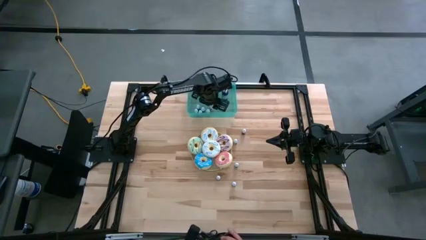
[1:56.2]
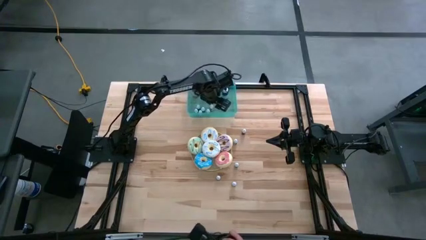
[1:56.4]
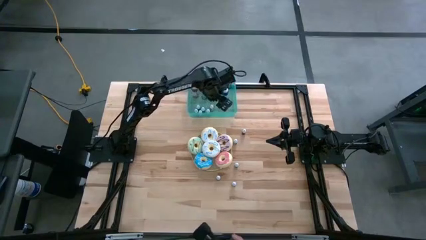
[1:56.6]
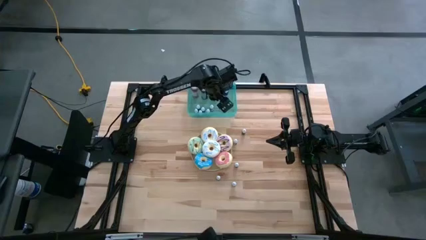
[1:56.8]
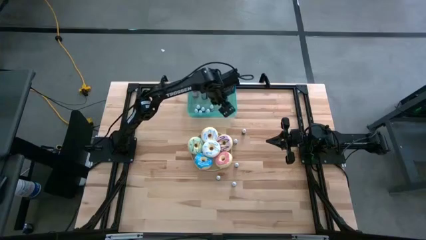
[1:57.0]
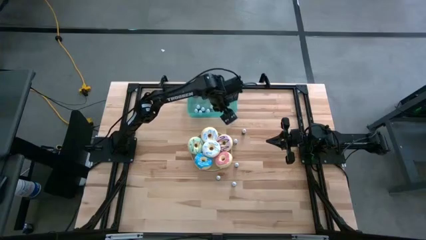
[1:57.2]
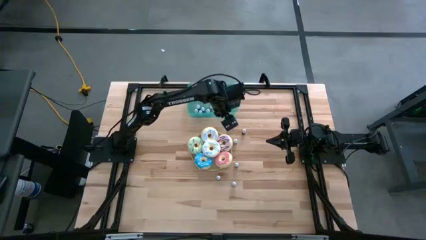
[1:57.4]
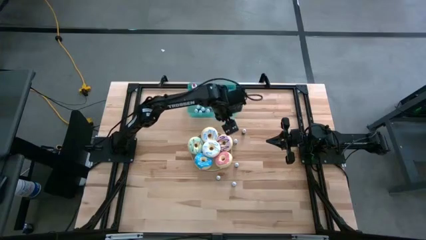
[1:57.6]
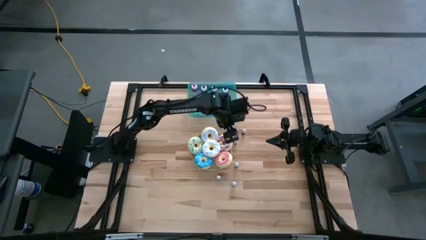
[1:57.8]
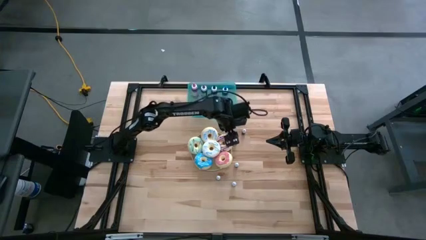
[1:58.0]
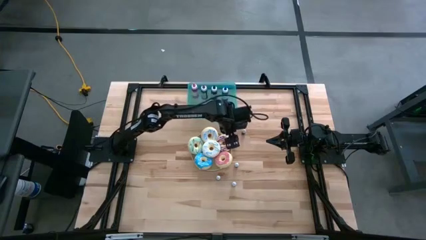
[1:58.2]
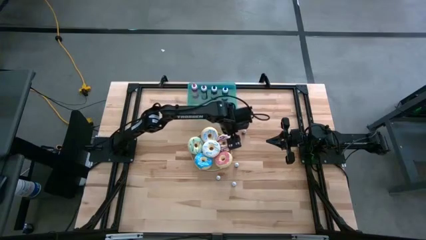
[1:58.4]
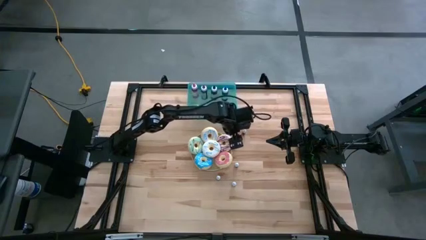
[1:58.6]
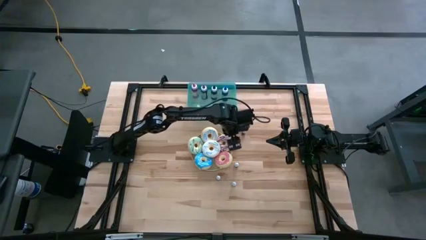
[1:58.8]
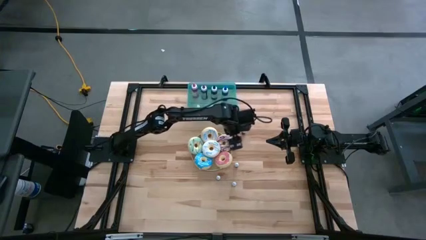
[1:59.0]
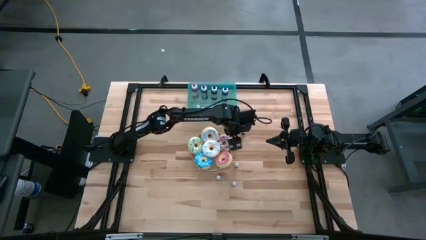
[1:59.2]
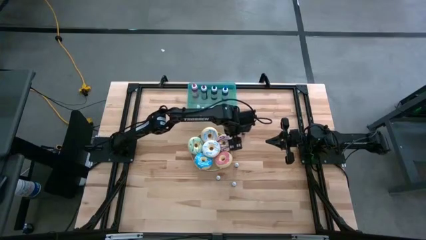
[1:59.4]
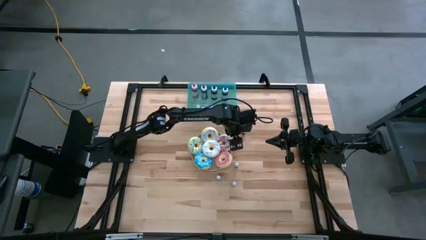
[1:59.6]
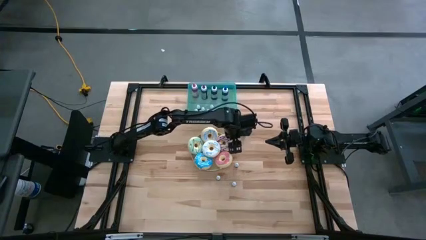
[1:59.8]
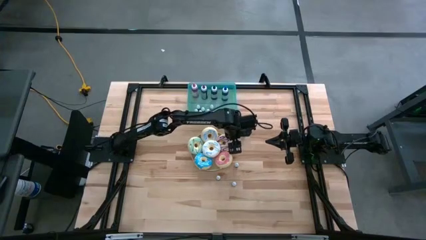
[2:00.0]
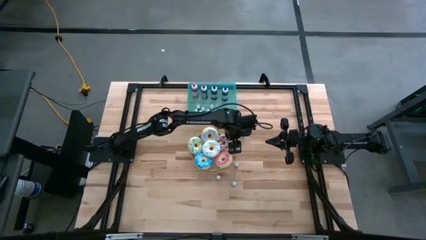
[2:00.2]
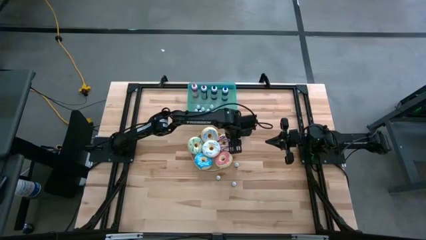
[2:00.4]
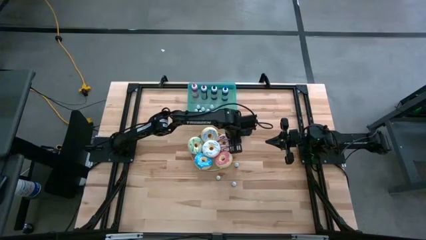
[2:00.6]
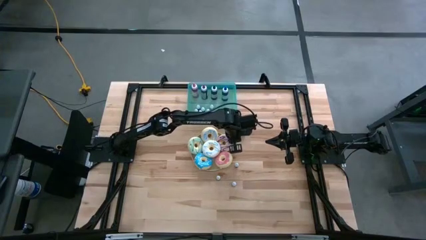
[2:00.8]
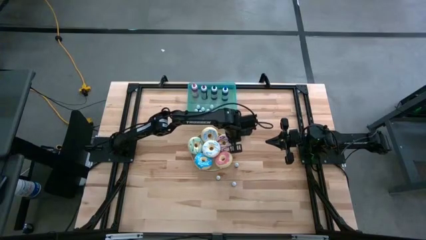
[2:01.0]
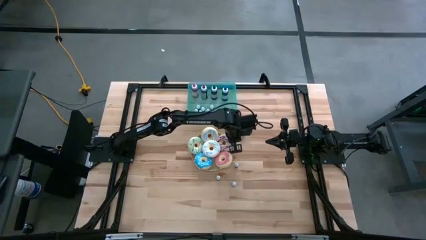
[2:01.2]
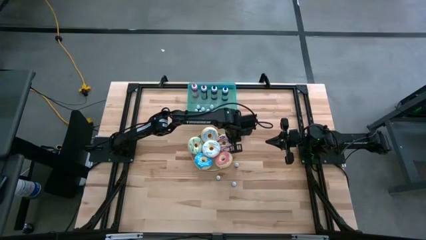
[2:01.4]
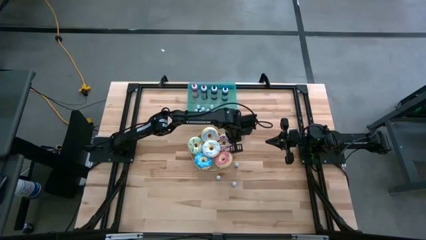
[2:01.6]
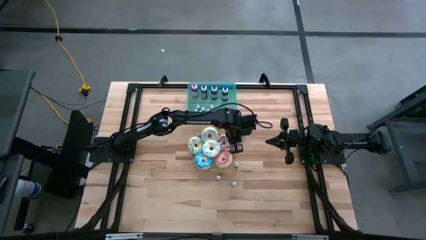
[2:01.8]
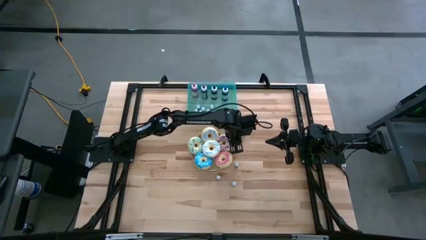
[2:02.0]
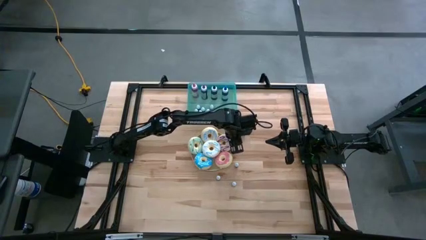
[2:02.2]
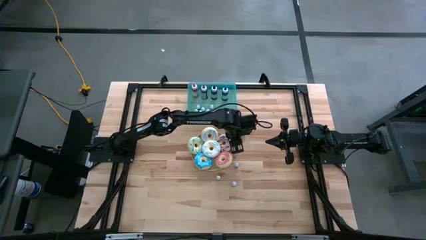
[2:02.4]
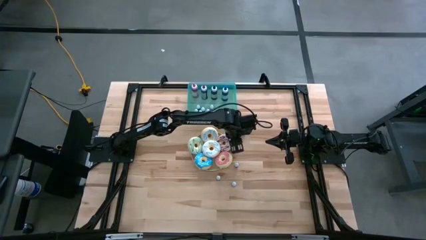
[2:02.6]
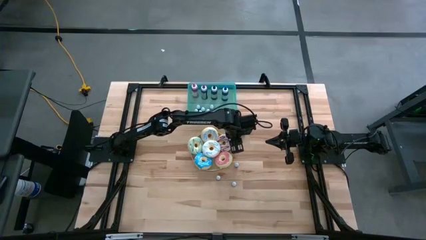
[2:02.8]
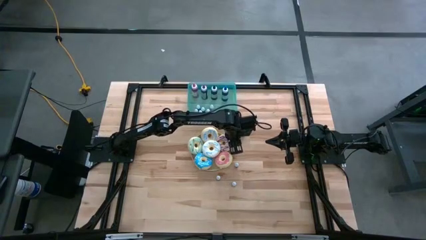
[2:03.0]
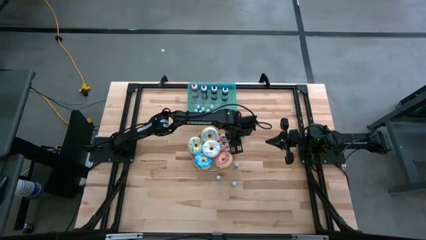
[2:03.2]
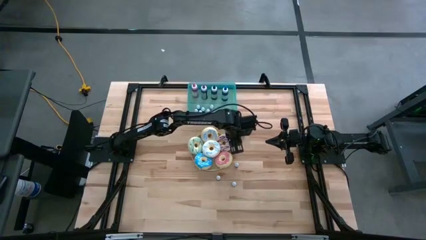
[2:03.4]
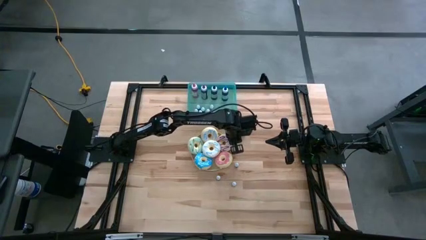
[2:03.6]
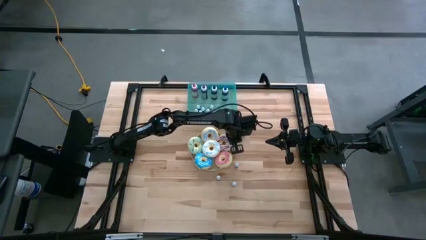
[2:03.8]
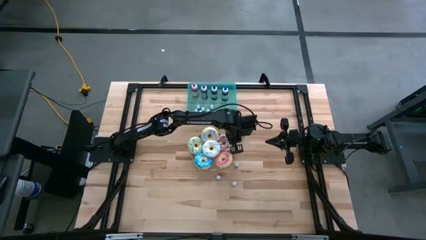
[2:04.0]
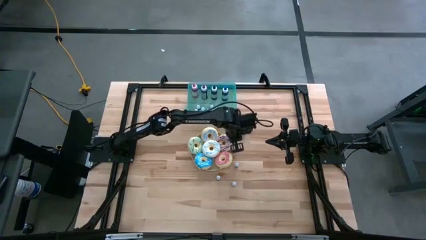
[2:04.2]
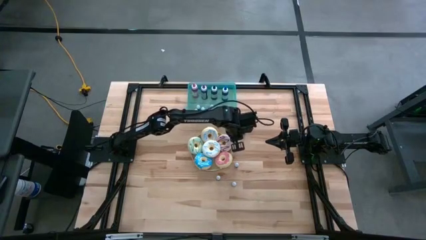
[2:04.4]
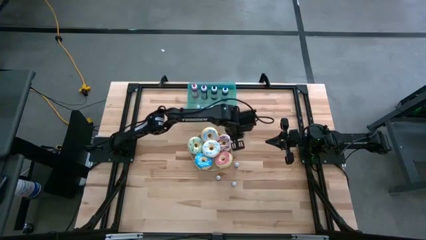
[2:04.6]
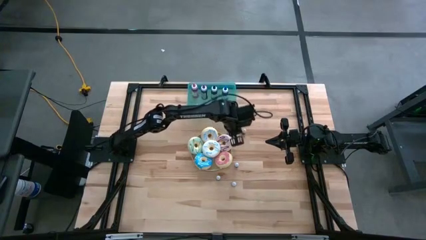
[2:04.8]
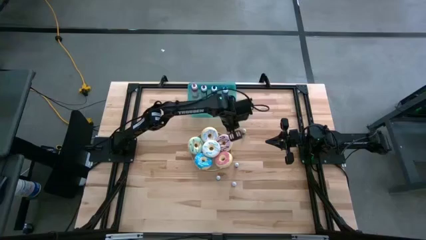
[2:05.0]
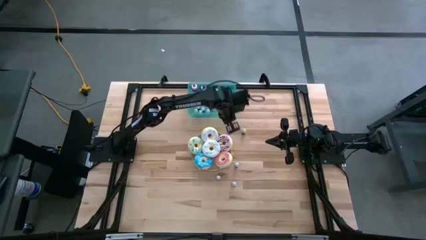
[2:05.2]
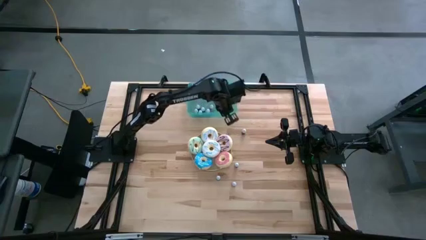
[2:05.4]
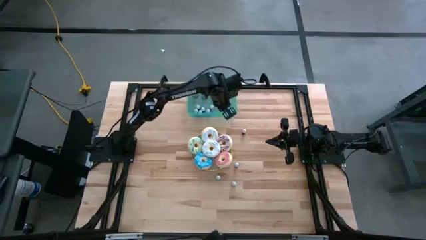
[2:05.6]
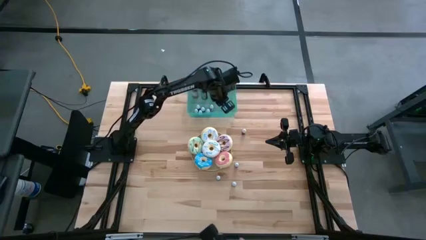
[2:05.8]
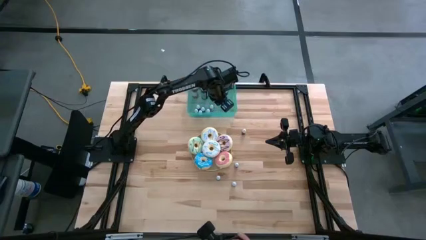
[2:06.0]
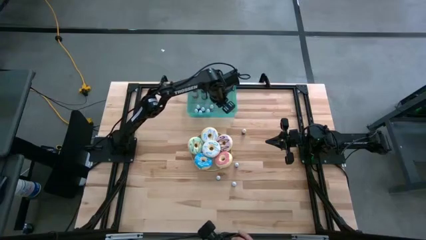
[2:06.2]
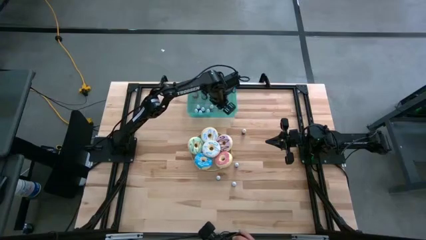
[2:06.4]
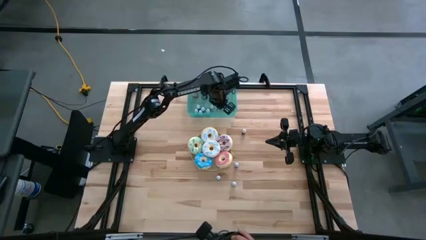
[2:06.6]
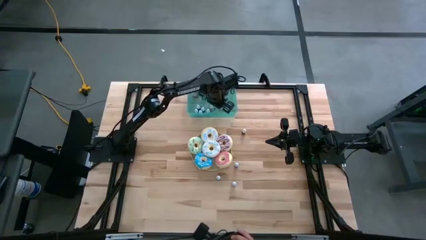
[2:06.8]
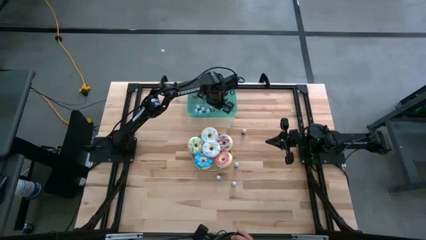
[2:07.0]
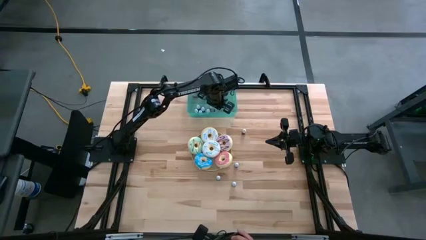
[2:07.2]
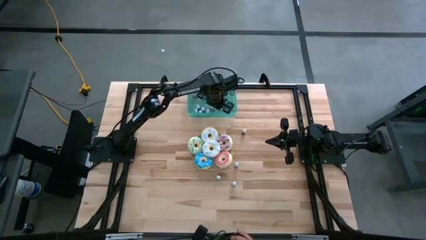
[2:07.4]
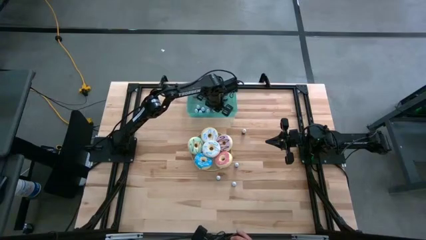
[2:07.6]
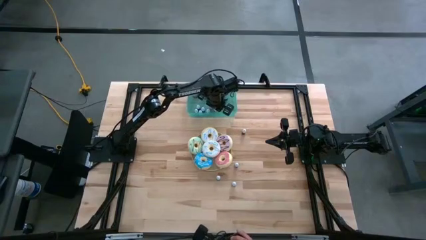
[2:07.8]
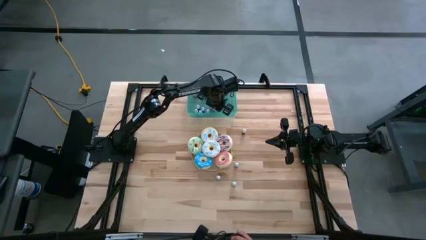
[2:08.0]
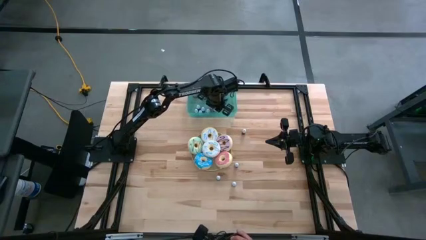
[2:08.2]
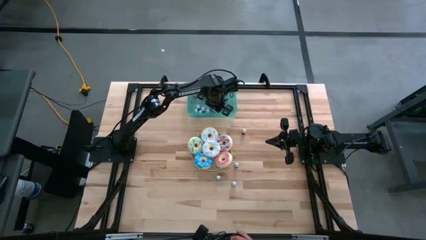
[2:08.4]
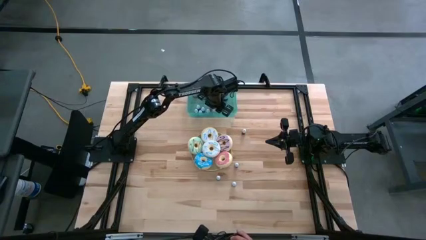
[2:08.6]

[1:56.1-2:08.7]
Task: Pick & Place food coloring
Put the top small black food coloring bottle into the green container

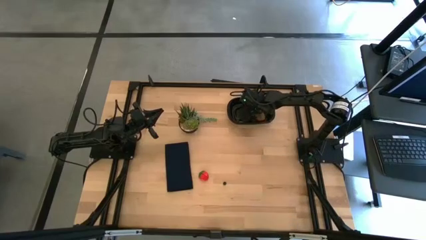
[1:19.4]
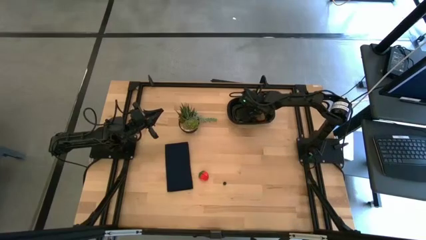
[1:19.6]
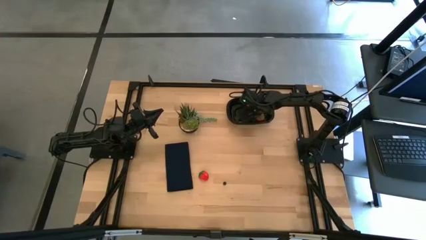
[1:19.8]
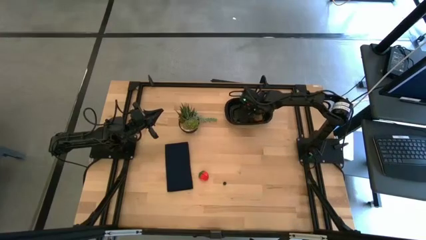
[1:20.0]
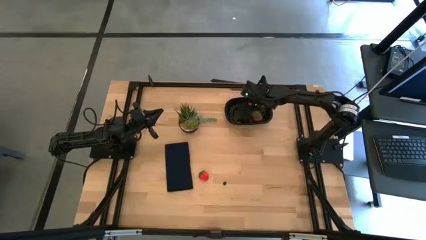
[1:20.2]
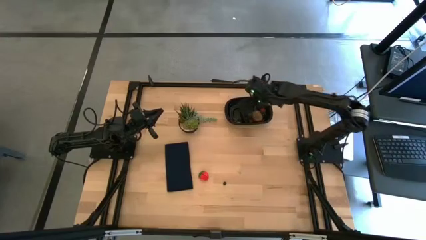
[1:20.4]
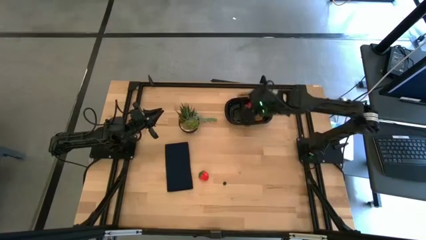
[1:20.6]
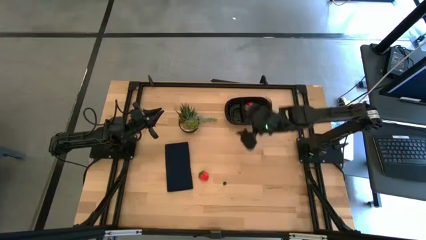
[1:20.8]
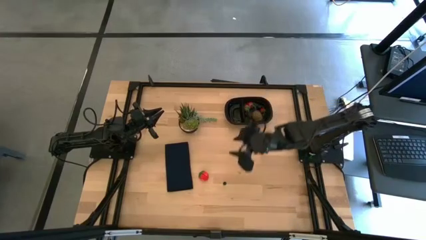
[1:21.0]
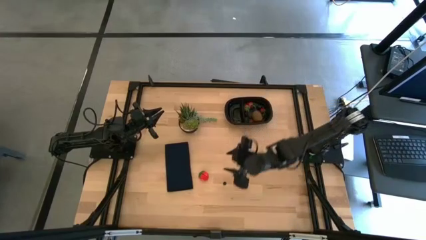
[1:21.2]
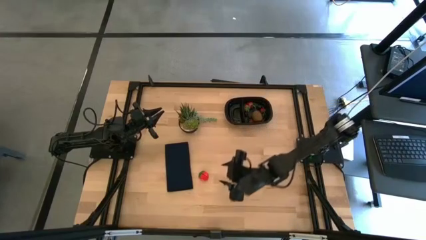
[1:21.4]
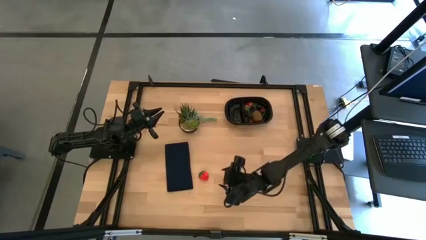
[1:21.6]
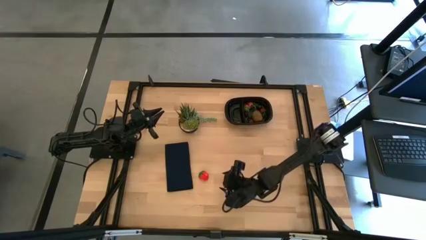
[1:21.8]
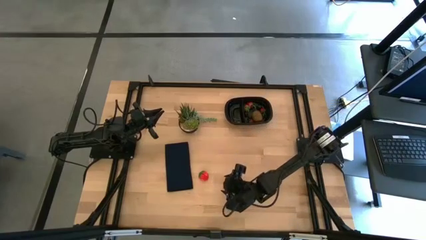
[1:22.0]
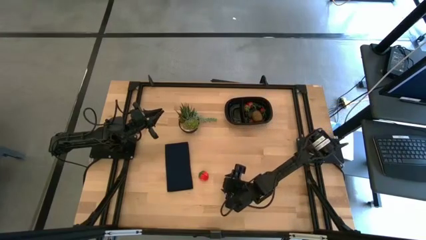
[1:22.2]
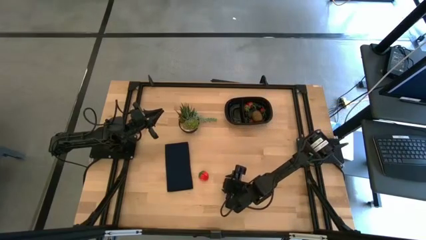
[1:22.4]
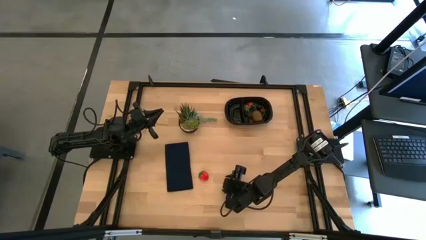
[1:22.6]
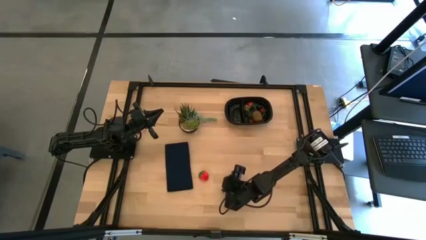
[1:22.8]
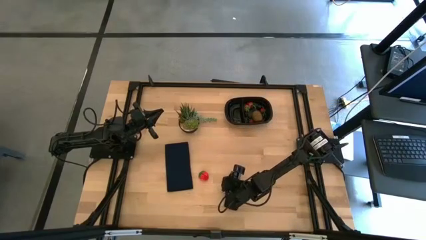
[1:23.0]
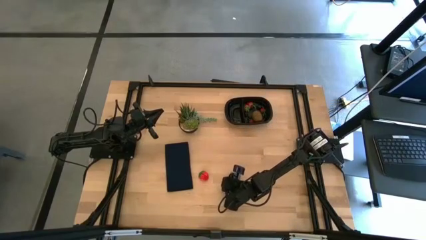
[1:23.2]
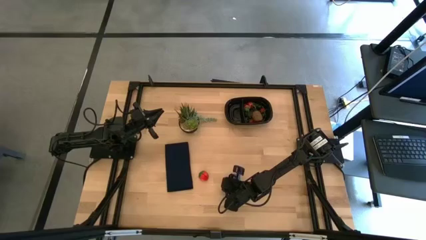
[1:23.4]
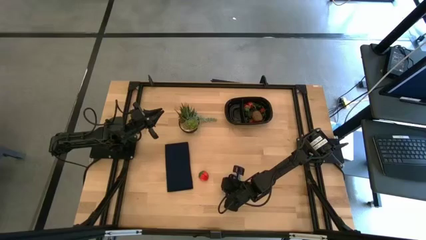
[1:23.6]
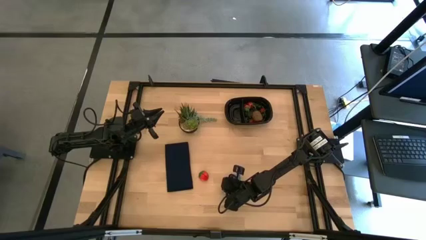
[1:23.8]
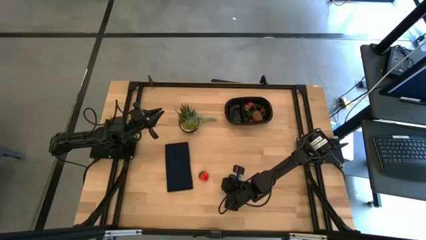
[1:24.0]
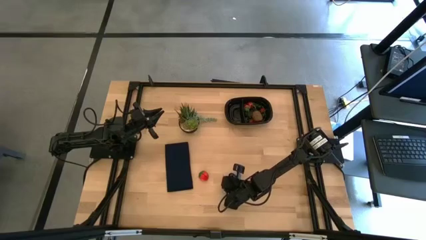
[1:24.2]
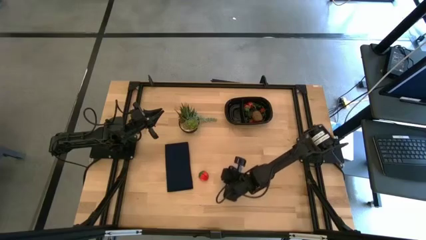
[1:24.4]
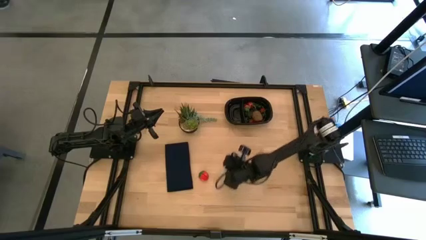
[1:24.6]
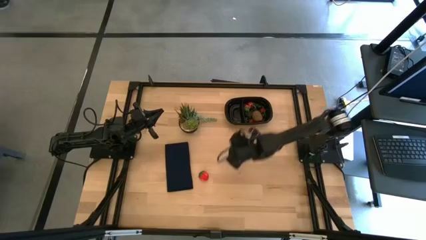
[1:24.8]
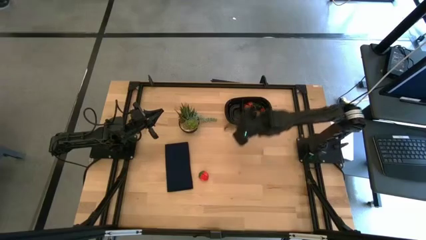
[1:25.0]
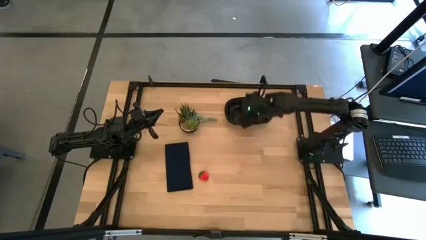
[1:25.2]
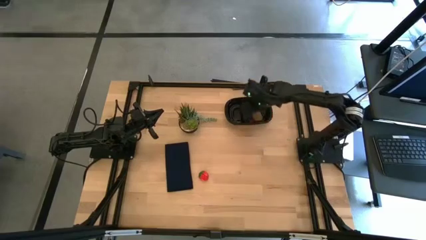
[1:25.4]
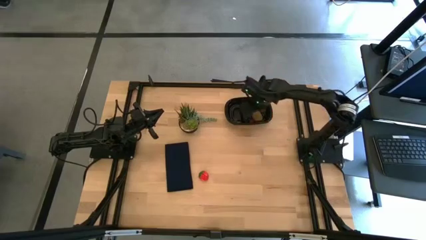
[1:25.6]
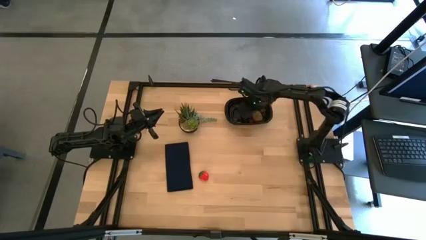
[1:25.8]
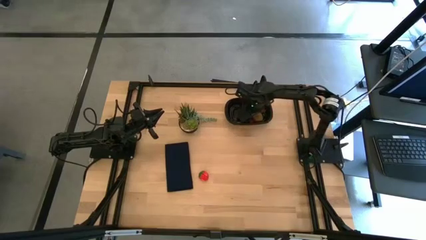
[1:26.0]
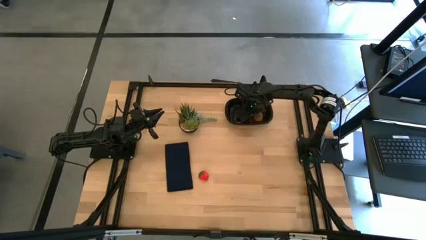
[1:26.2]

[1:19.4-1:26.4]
Task: Pick and placing Produce into tupperware
Put the blueberry into the black container
